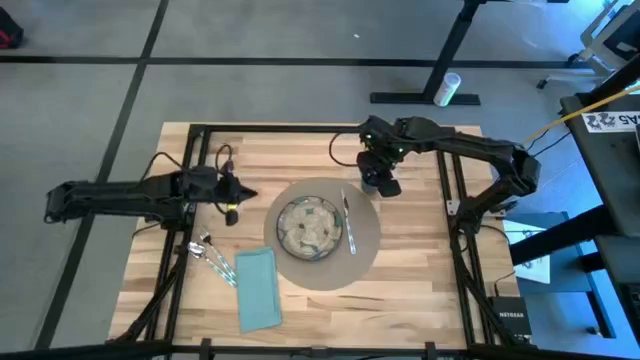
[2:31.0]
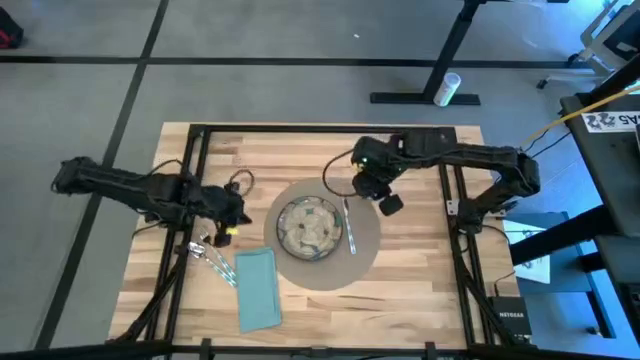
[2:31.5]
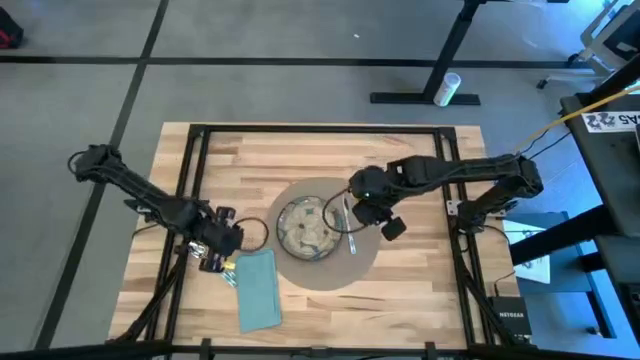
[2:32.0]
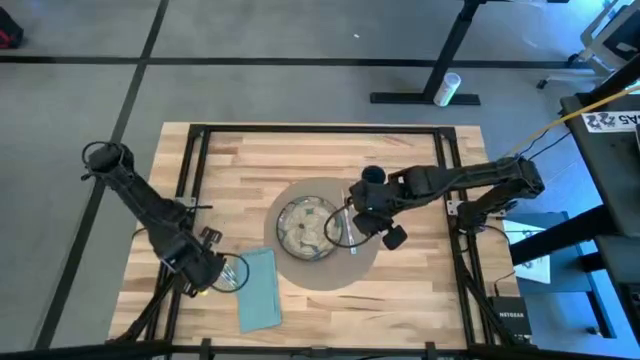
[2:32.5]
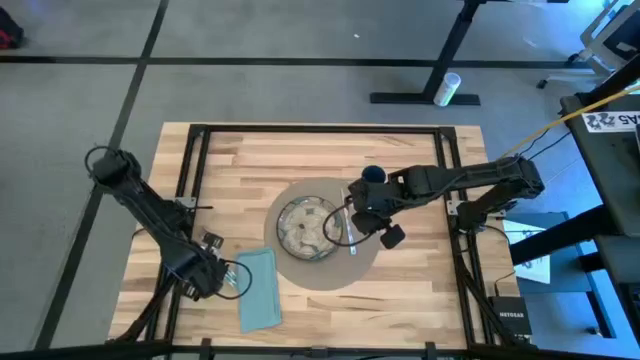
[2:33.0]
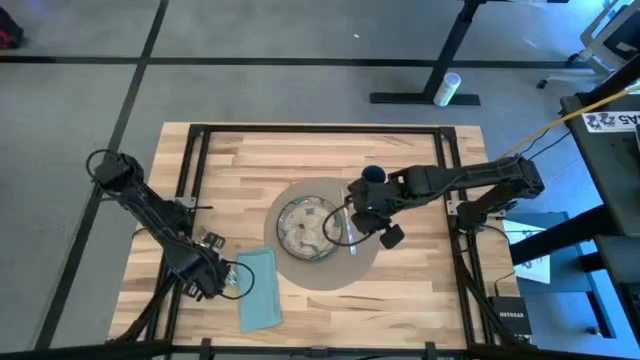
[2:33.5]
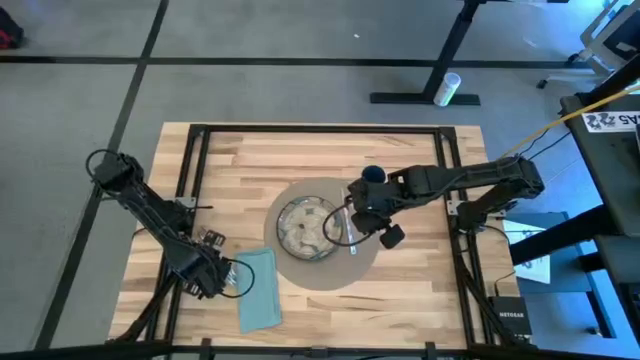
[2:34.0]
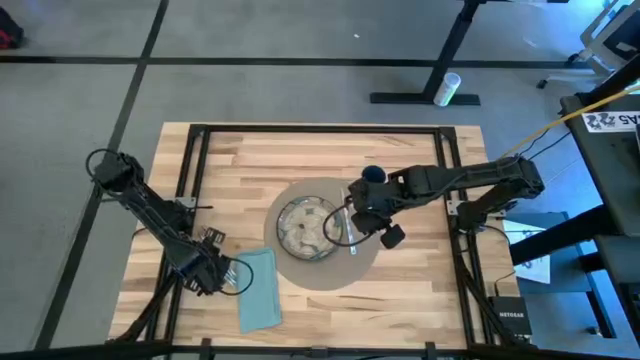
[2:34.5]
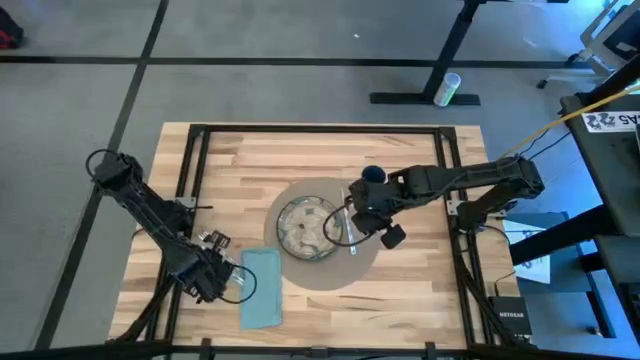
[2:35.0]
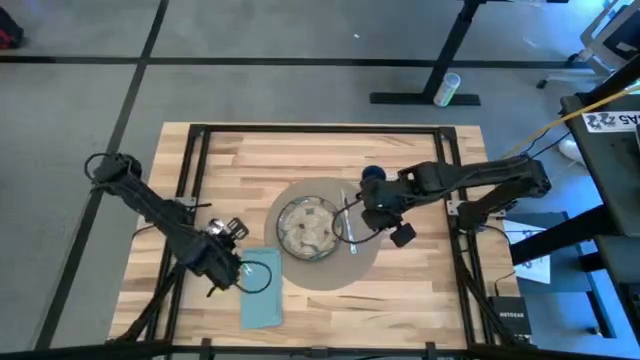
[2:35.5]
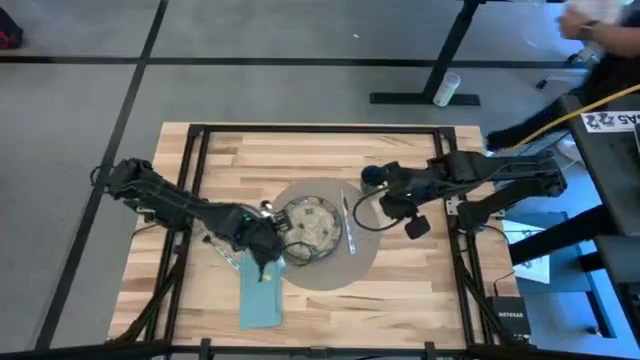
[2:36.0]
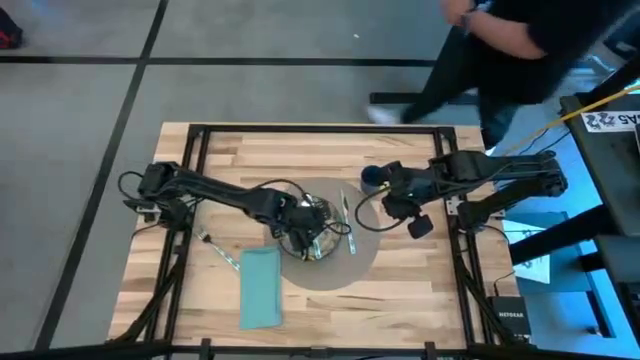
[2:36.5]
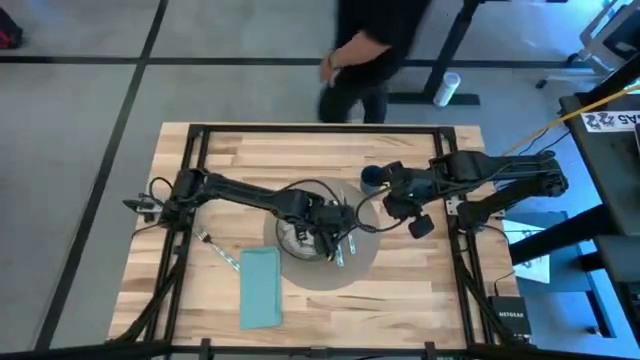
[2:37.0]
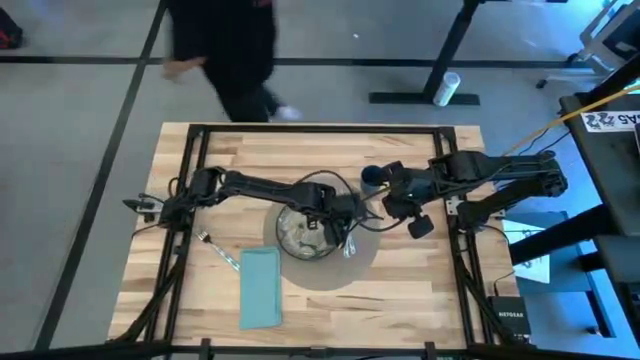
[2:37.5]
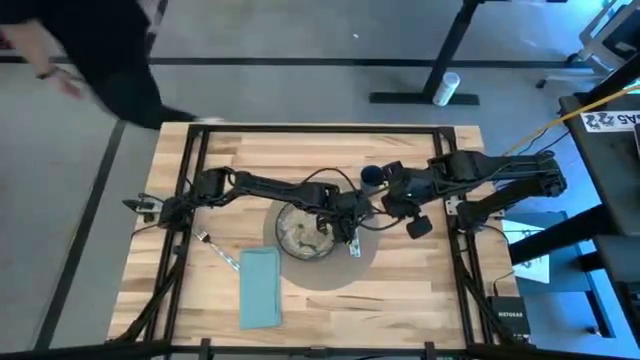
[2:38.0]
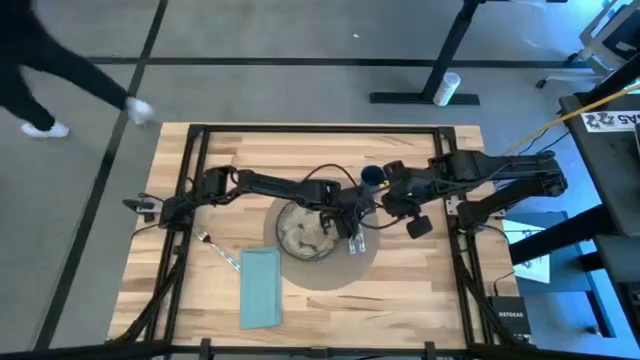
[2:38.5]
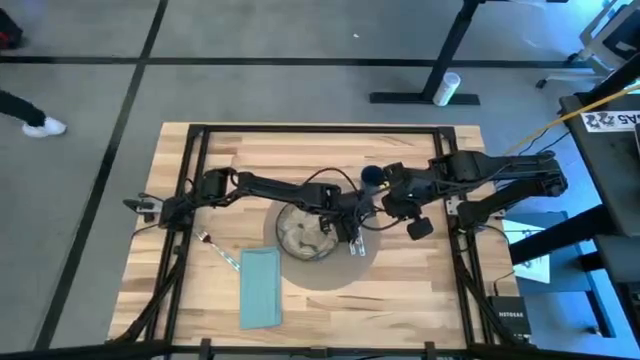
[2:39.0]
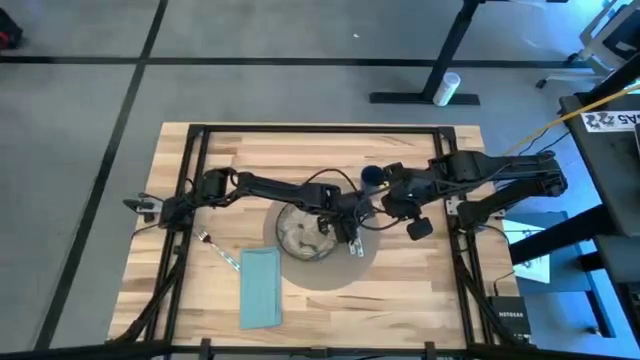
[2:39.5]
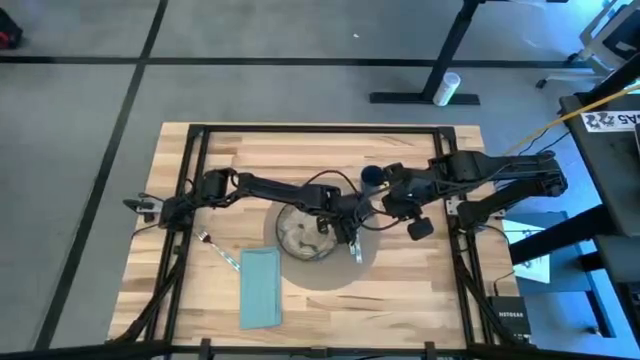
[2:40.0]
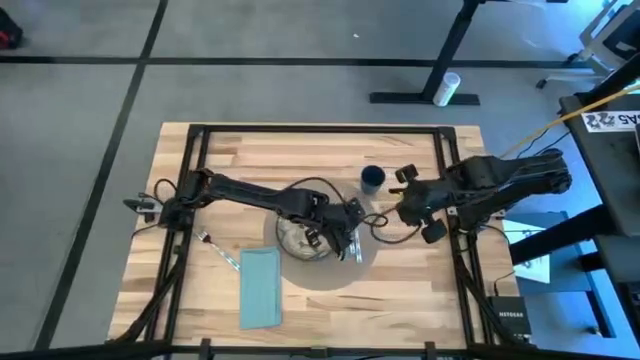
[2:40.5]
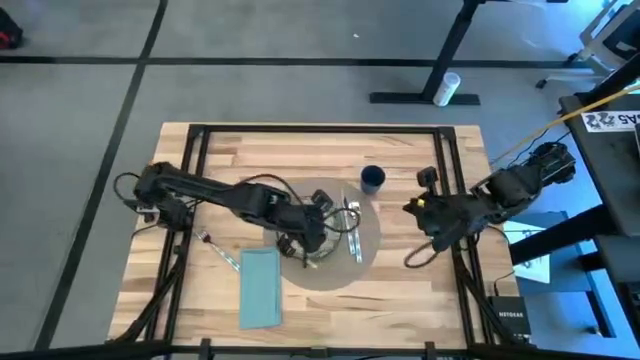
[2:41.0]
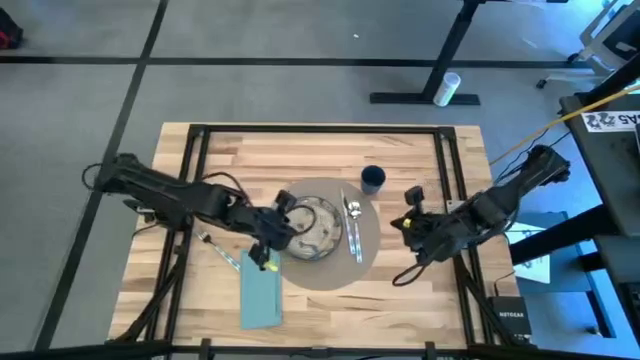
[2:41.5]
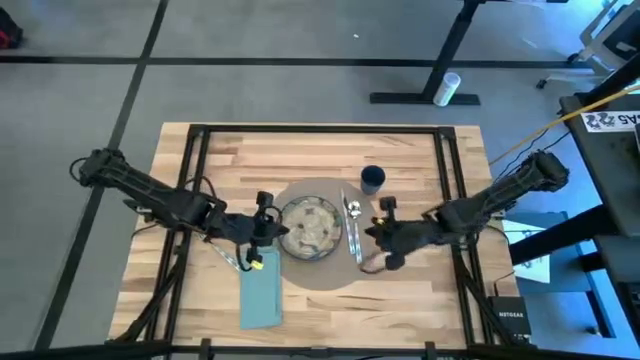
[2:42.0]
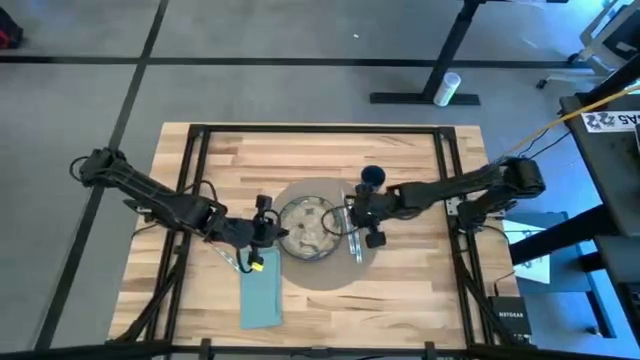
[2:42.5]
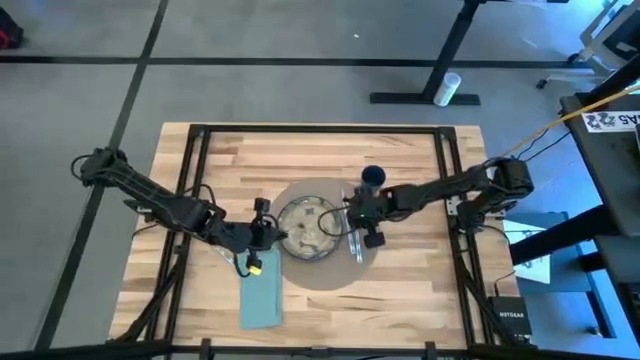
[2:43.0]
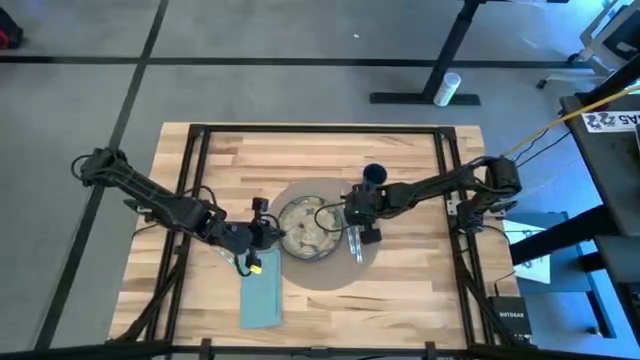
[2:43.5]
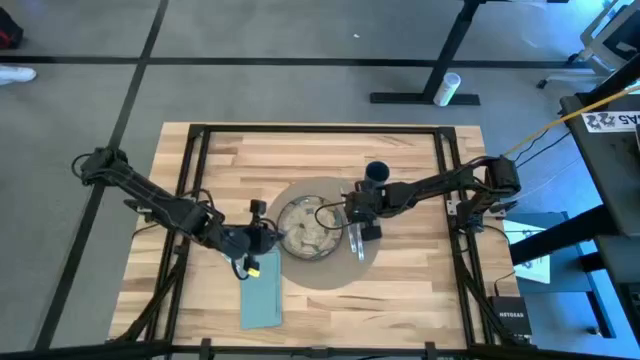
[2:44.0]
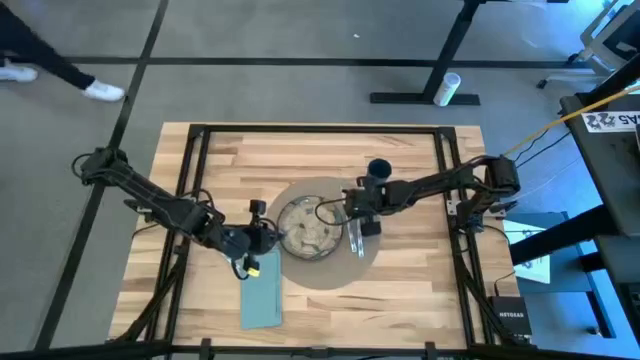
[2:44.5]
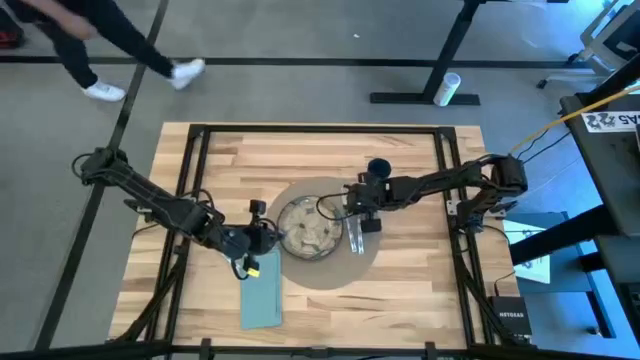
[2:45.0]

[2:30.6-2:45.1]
Task: Set table place
Put the blue patterned spoon on the brown tablemat to the right of the blue patterned table knife

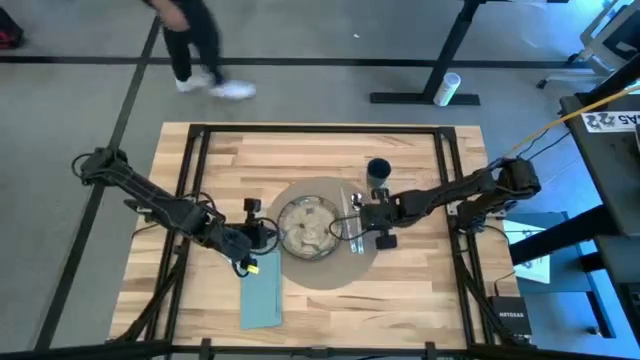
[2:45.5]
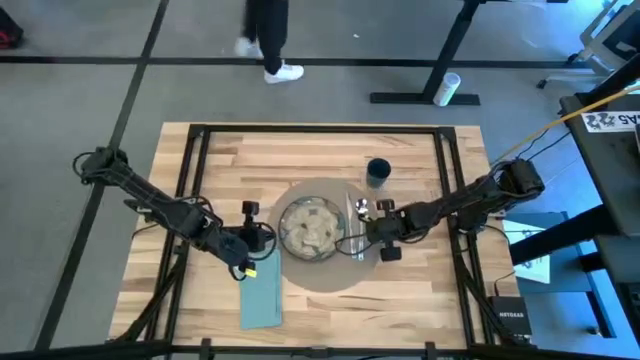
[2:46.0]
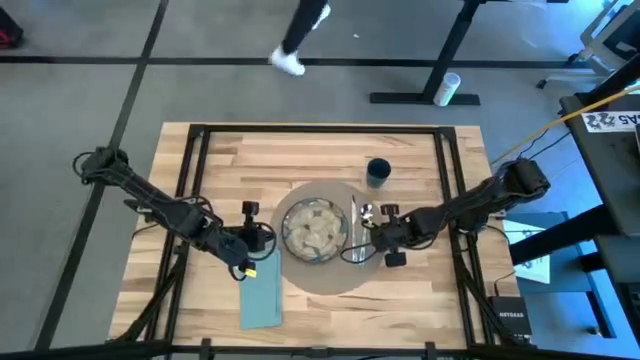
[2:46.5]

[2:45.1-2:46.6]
Adjust the brown tablemat

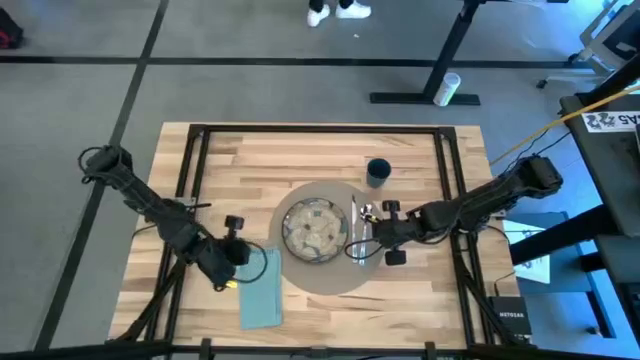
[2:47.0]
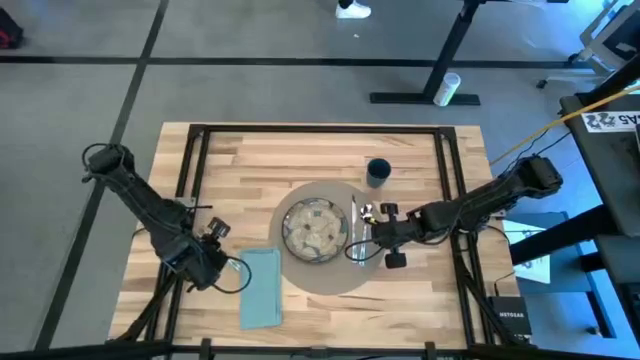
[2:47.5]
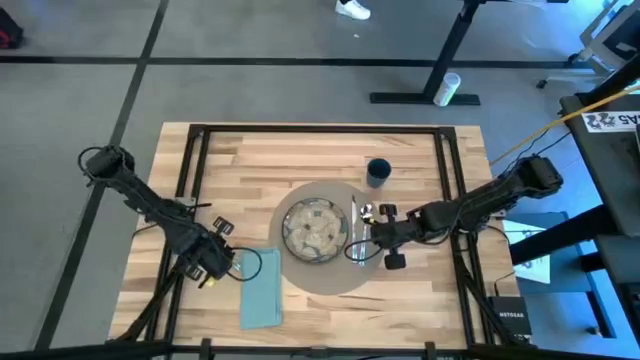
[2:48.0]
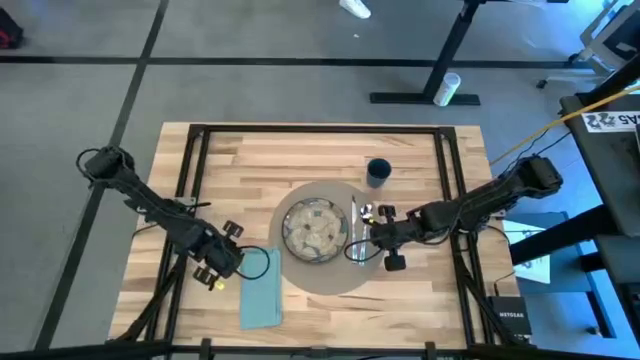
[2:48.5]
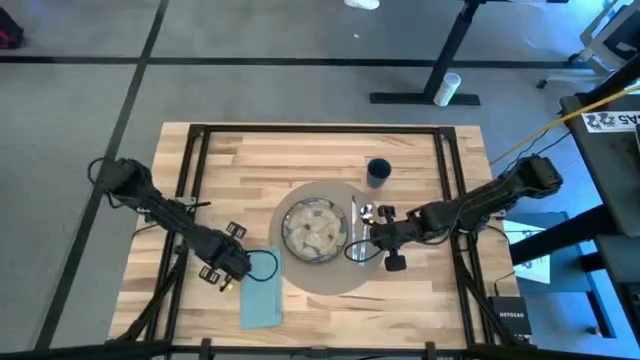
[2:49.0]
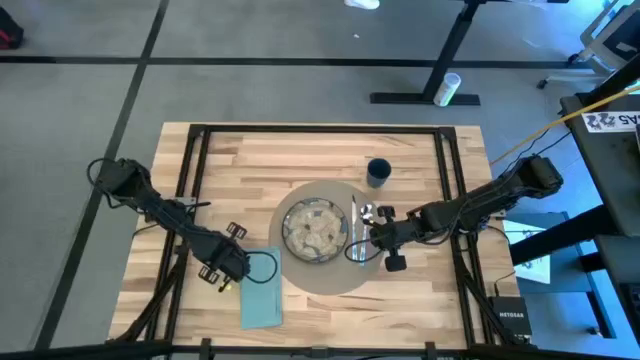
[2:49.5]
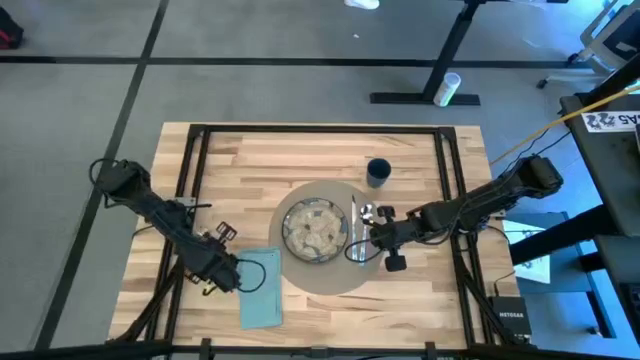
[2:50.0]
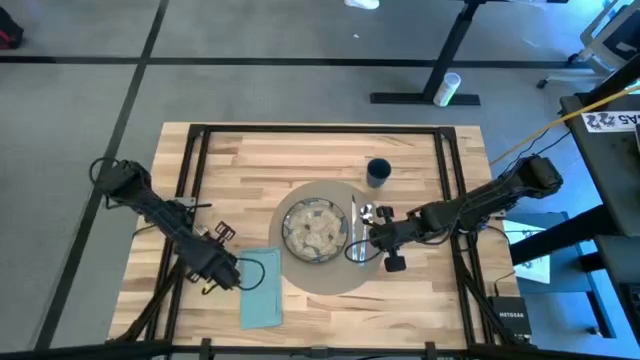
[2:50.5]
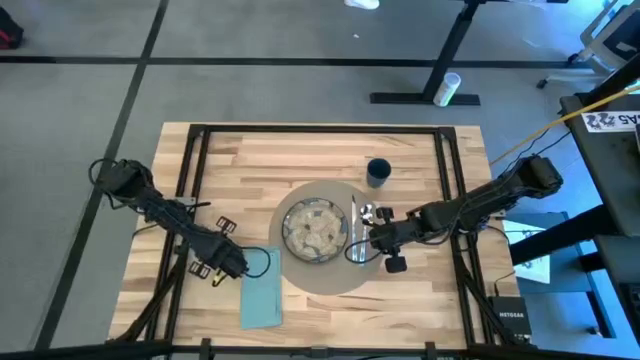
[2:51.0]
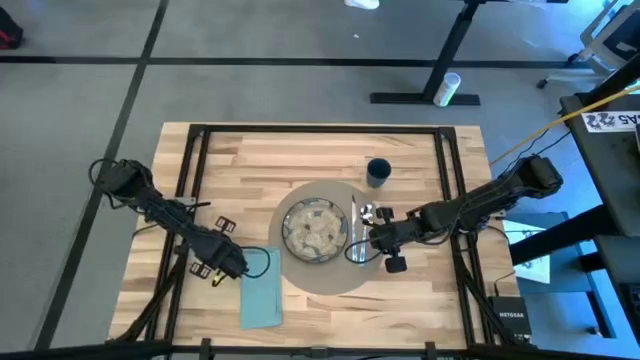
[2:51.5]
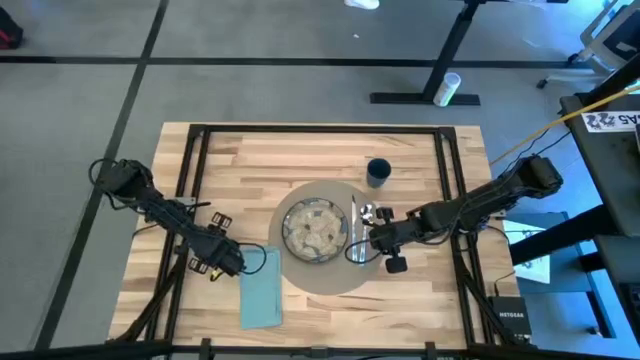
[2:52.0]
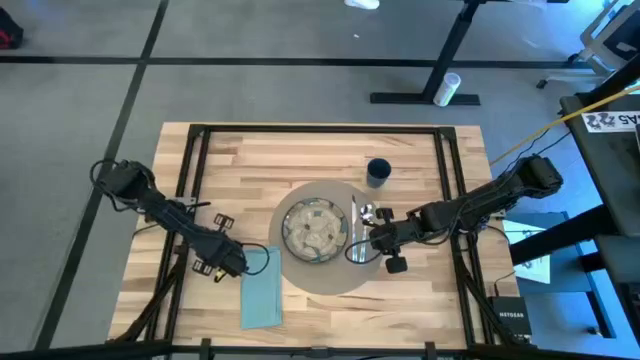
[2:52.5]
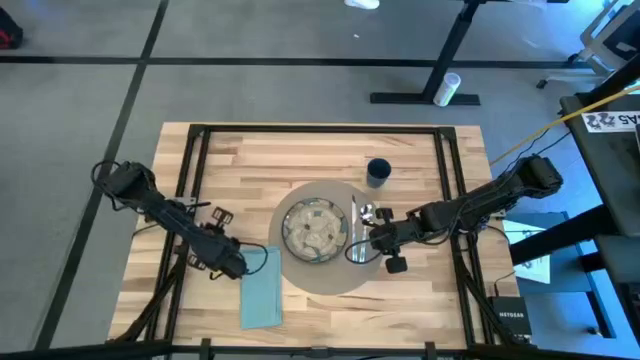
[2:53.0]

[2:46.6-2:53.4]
Put the blue patterned fork on top of the blue table napkin
